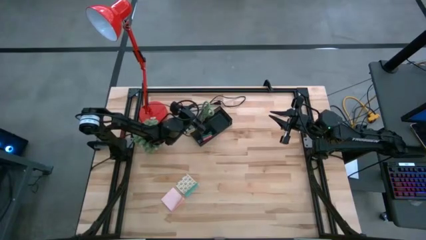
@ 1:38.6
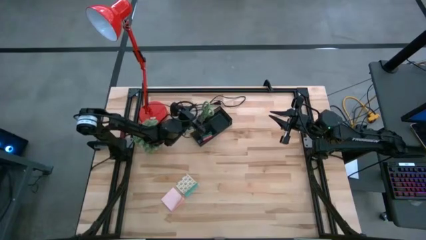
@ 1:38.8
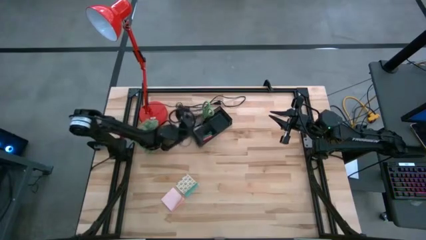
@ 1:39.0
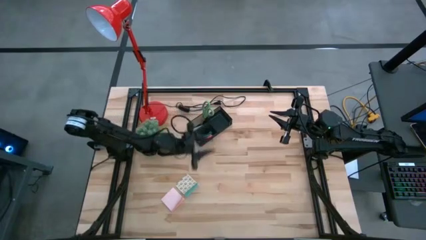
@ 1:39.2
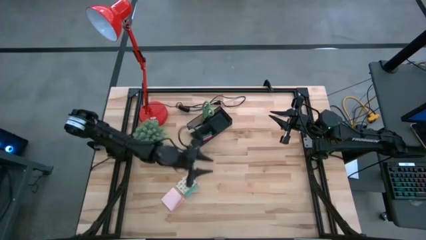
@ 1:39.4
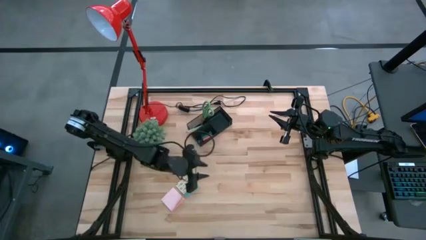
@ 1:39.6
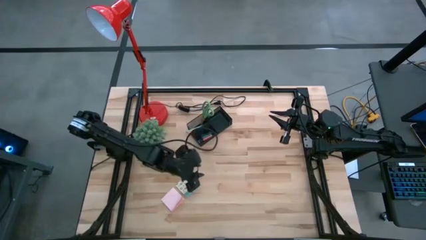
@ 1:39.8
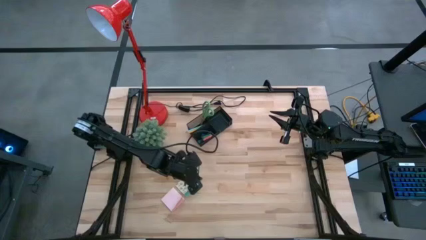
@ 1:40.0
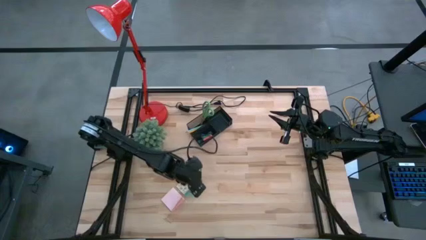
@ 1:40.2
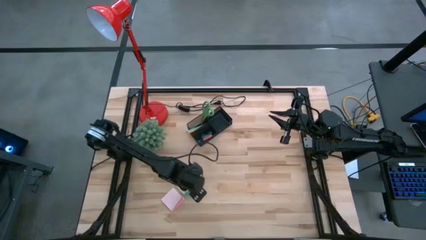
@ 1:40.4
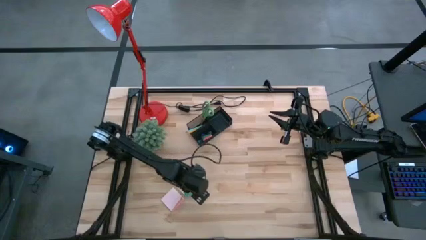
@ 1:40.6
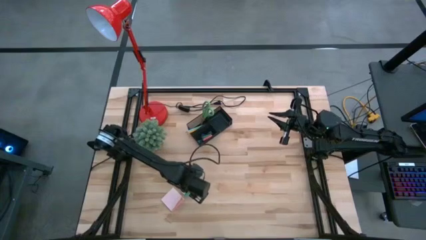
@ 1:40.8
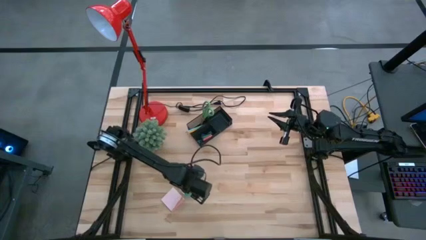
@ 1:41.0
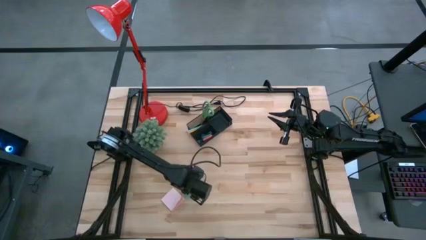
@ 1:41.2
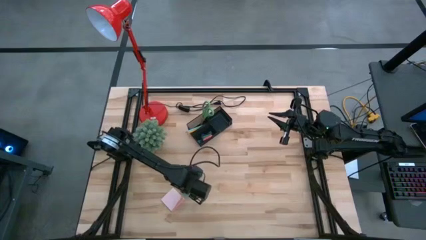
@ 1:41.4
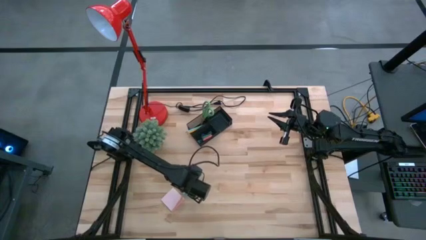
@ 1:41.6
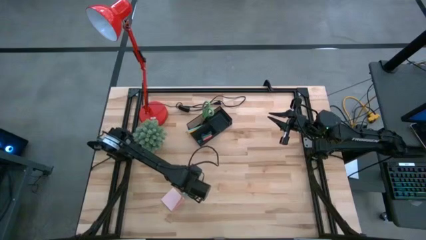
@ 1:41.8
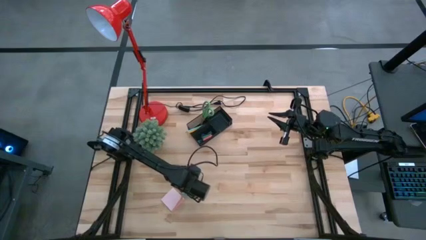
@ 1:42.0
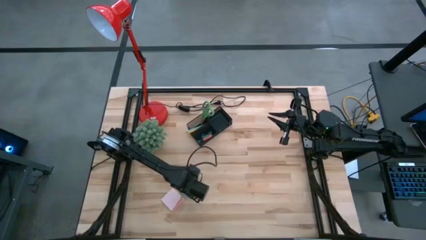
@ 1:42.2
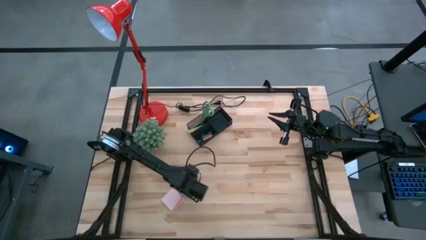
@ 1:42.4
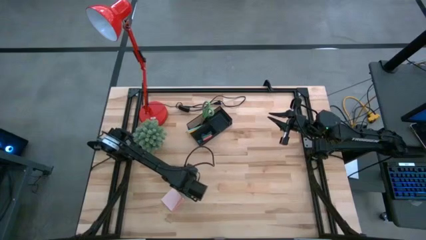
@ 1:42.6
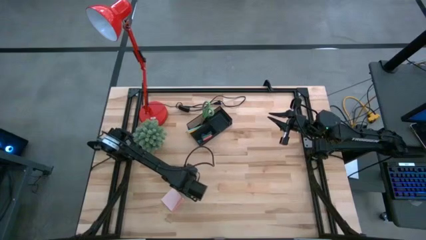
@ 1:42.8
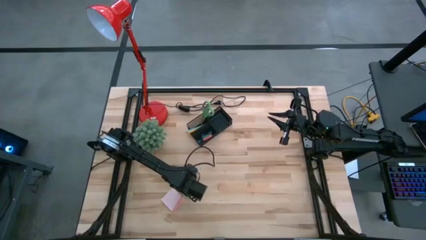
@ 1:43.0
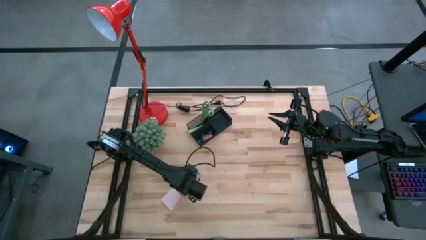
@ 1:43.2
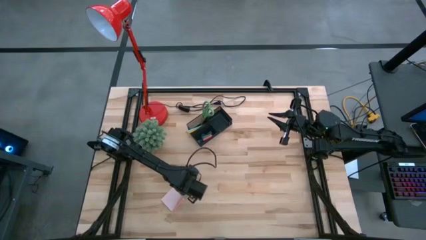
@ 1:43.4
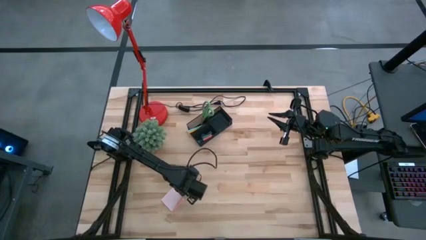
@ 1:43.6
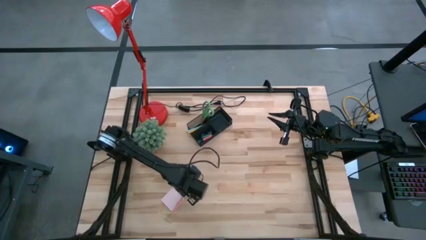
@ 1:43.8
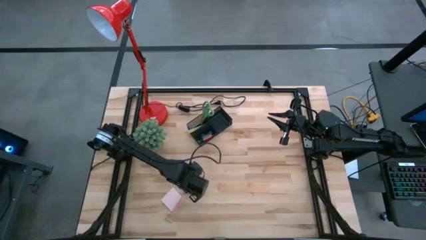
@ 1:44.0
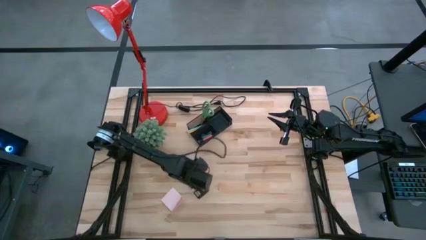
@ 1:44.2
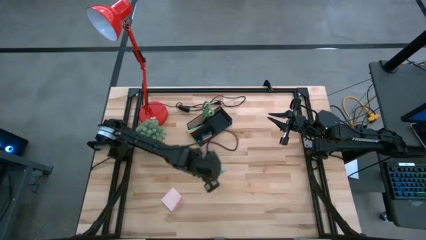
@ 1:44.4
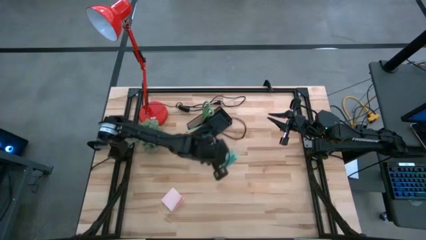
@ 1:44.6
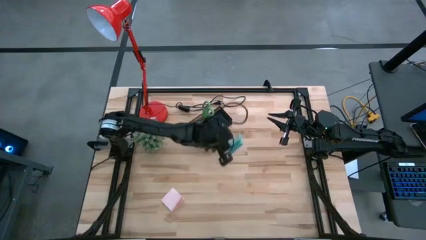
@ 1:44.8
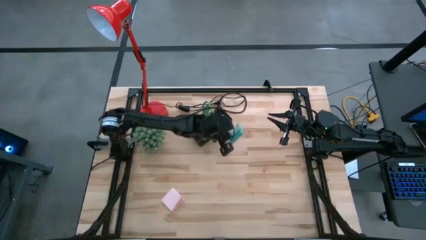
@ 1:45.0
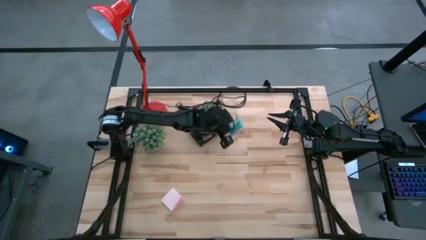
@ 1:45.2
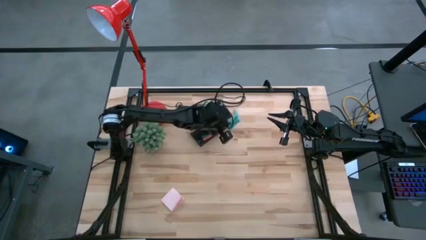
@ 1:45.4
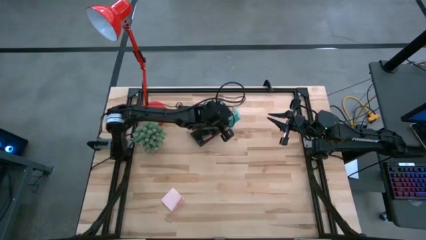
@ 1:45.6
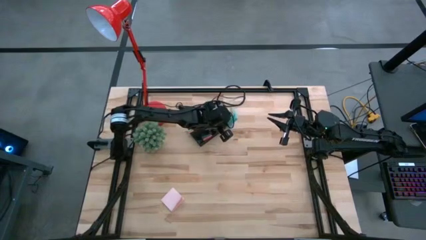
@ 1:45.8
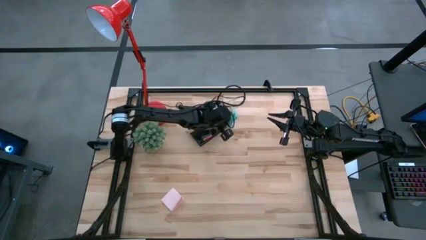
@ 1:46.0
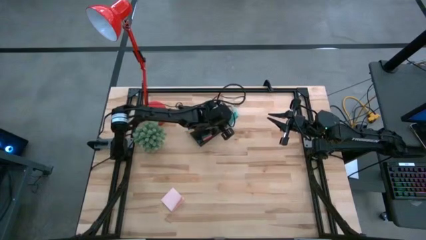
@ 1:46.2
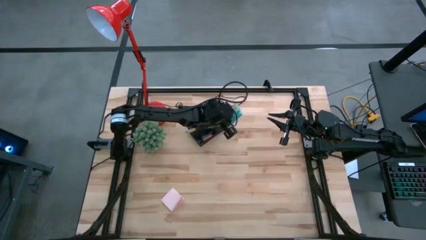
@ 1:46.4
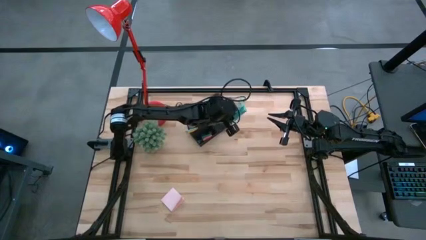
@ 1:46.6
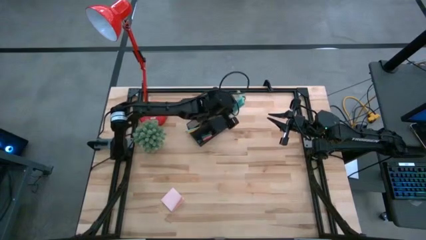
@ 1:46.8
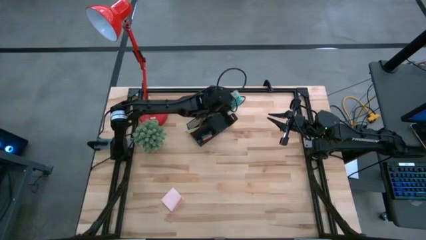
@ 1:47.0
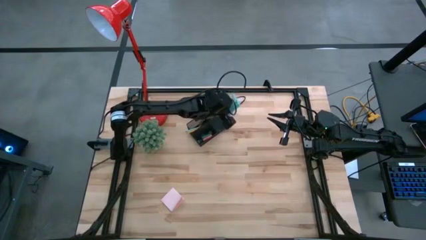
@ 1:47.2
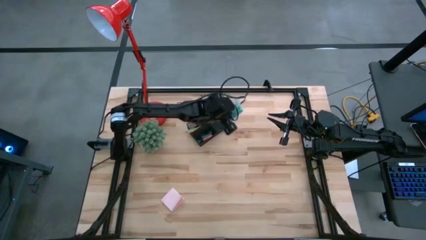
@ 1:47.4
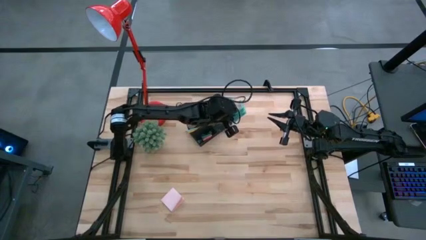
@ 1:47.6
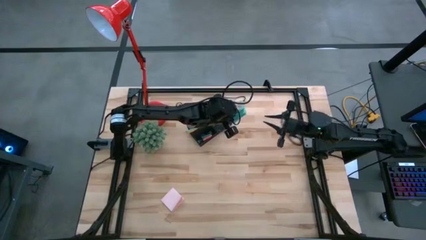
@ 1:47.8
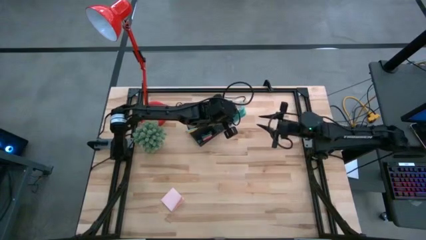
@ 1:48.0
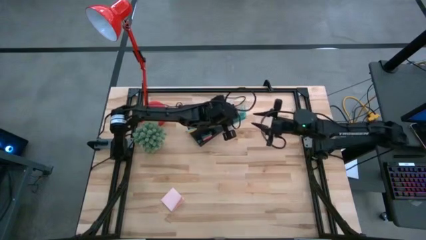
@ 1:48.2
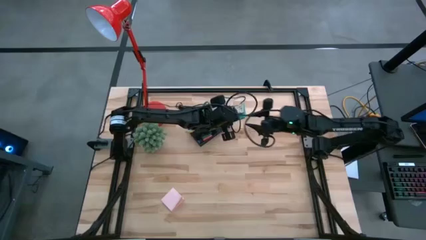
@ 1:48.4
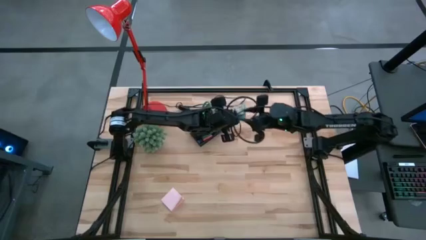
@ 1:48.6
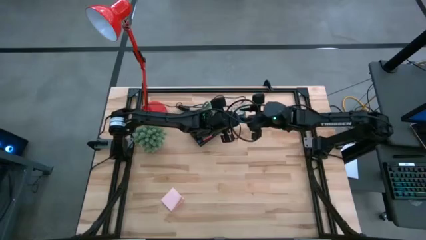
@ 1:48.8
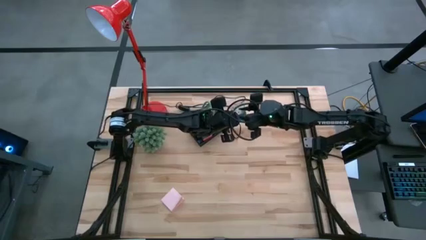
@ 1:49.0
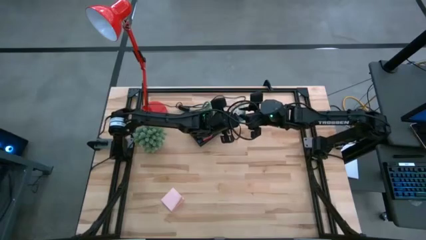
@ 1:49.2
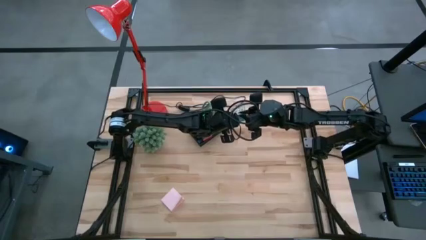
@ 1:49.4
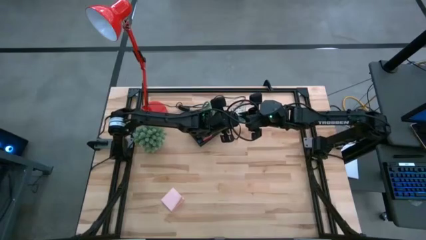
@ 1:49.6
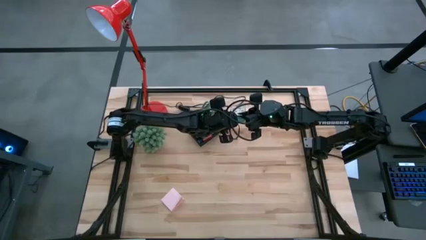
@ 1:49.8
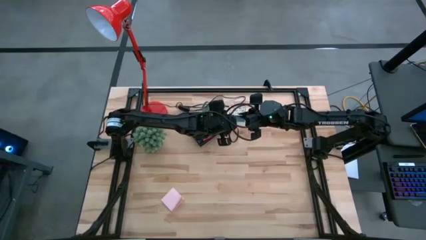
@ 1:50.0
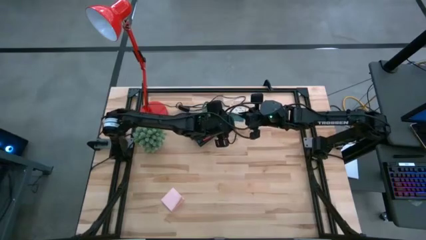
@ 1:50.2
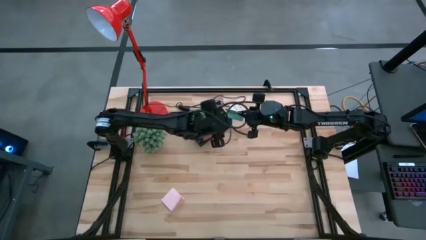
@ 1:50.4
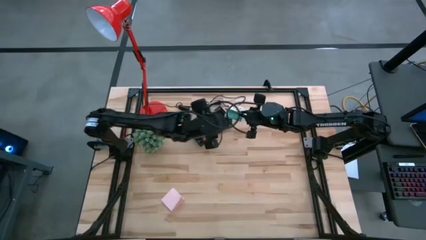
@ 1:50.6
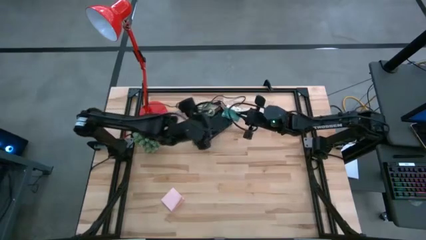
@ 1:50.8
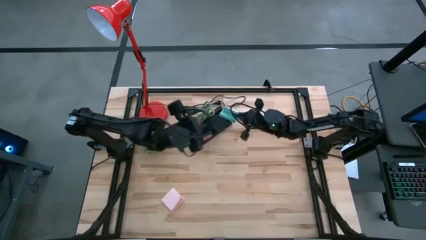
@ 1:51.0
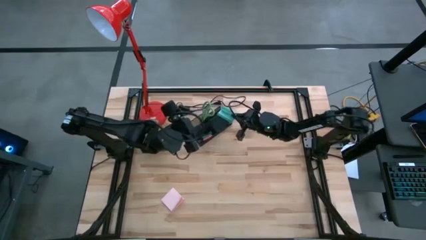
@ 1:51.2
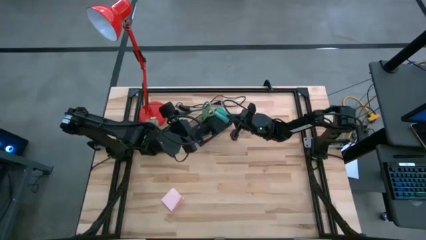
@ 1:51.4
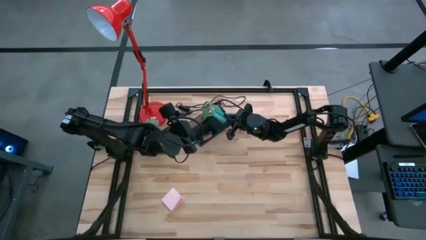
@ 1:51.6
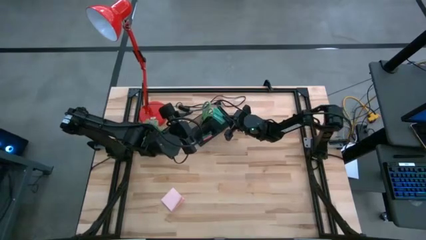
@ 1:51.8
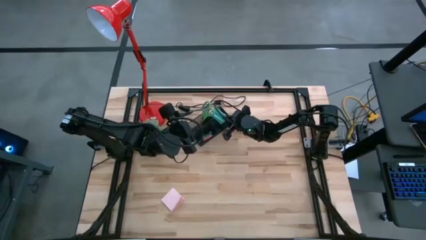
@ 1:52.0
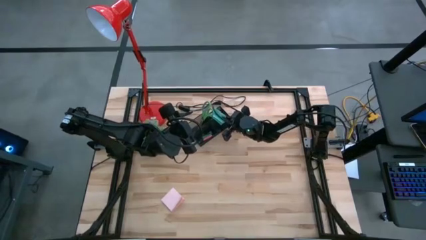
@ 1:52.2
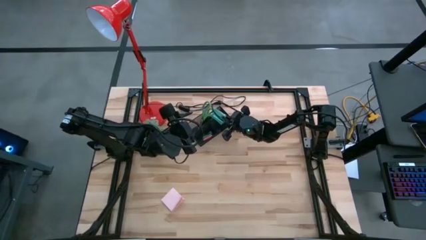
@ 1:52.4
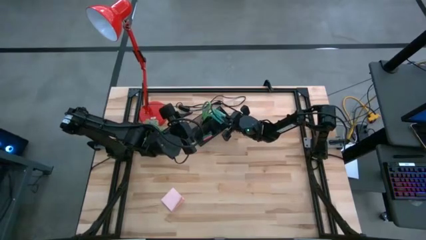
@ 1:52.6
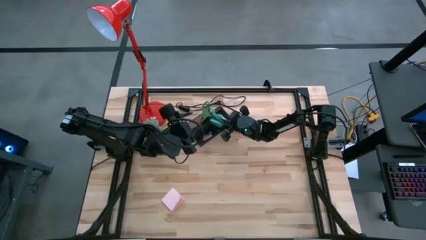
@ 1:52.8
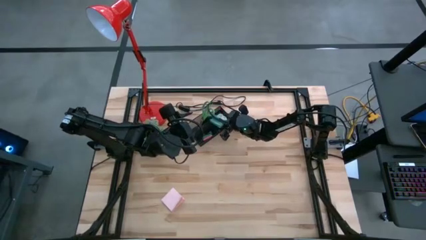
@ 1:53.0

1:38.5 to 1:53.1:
Task: Pick and place office supplies into organizer
Put the blue sticky notes into the black desk organizer
